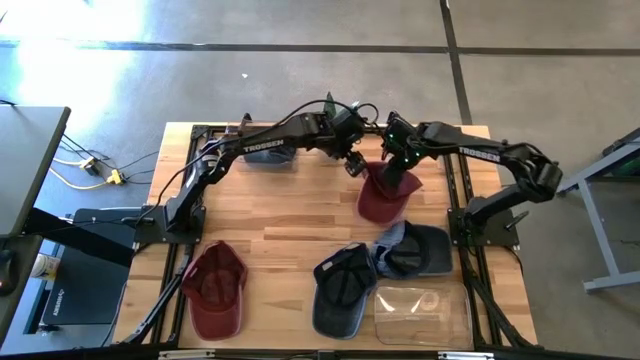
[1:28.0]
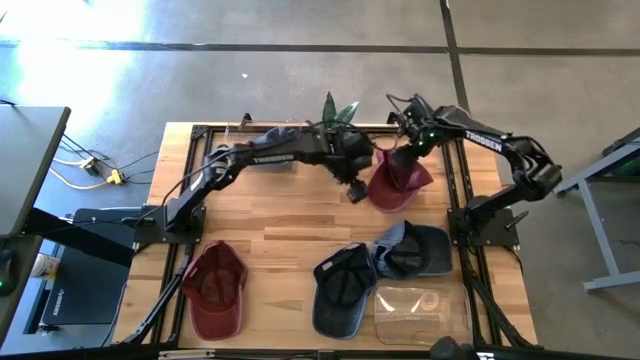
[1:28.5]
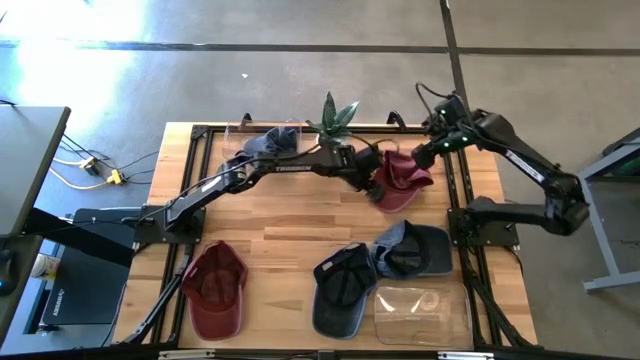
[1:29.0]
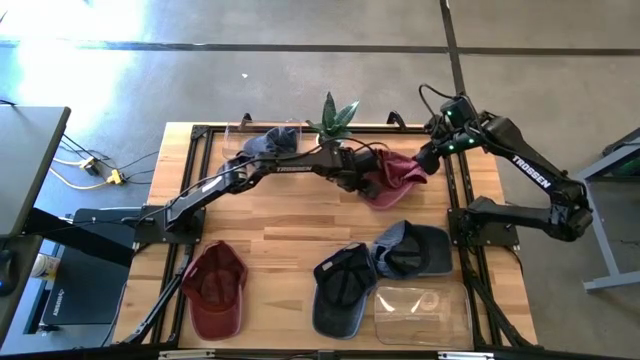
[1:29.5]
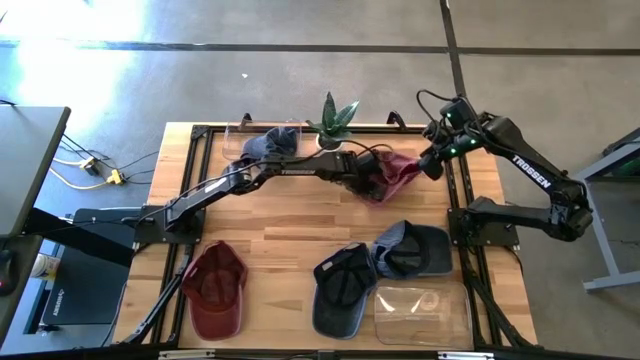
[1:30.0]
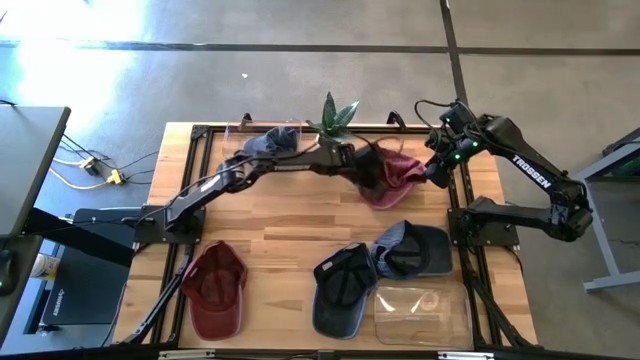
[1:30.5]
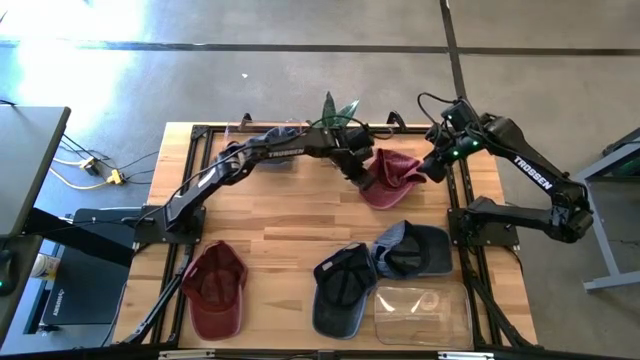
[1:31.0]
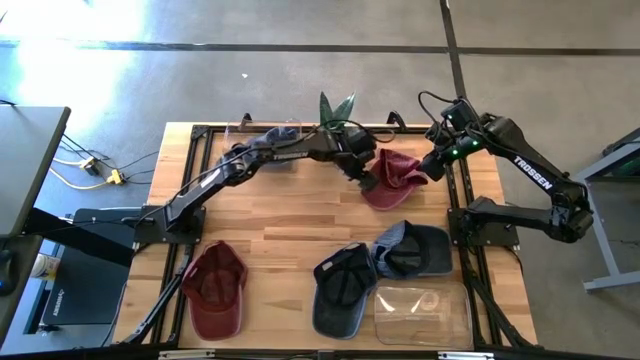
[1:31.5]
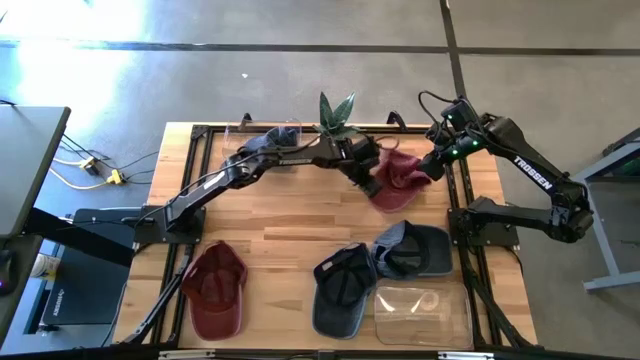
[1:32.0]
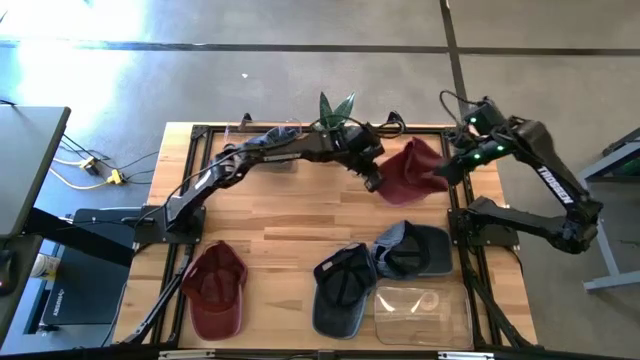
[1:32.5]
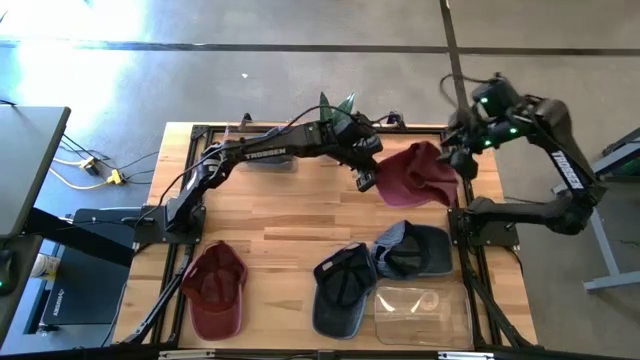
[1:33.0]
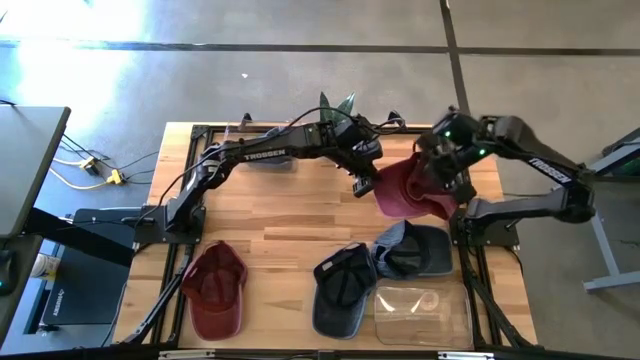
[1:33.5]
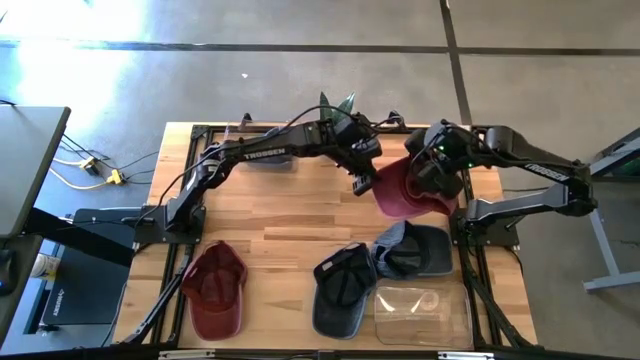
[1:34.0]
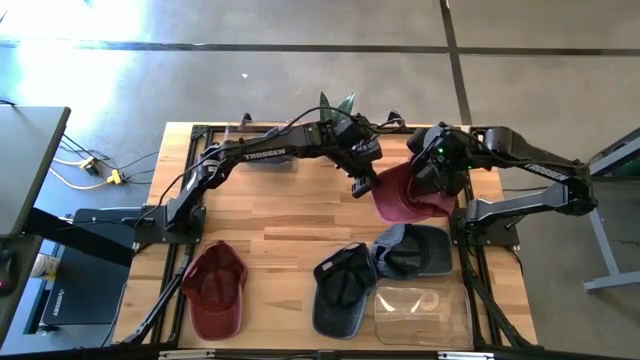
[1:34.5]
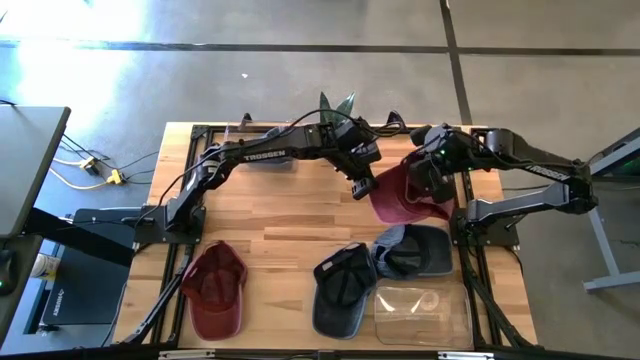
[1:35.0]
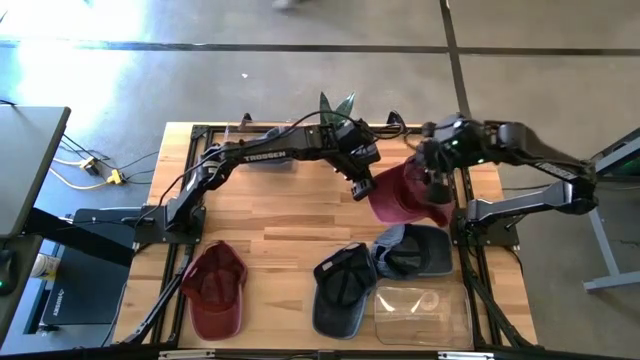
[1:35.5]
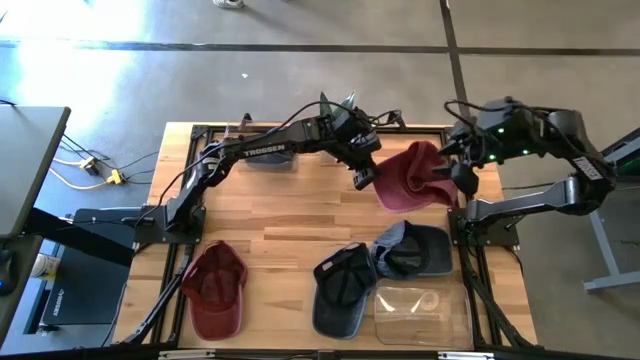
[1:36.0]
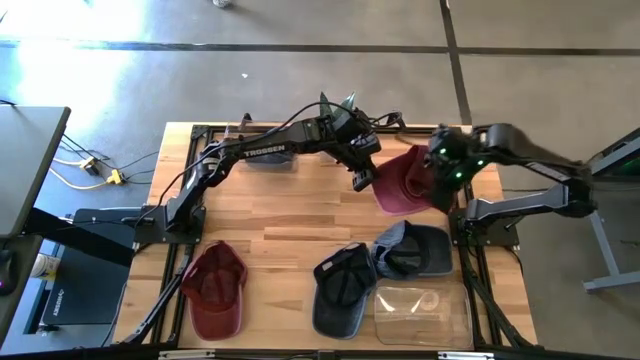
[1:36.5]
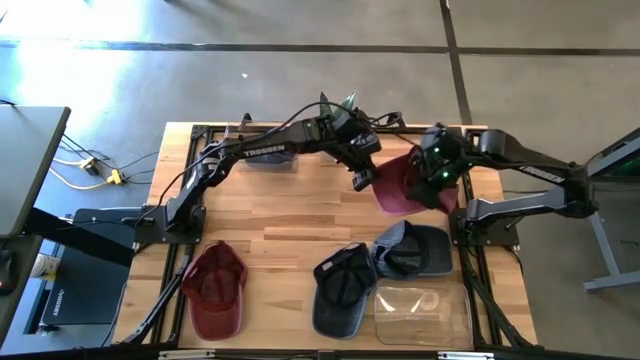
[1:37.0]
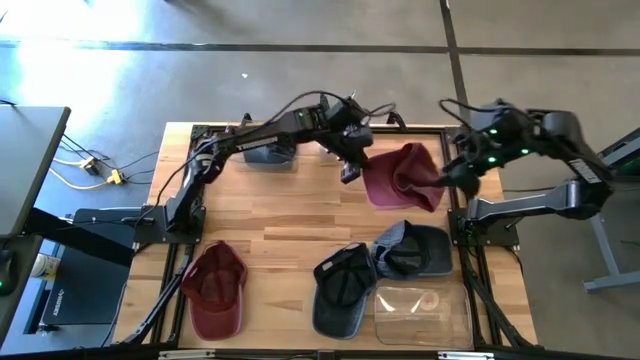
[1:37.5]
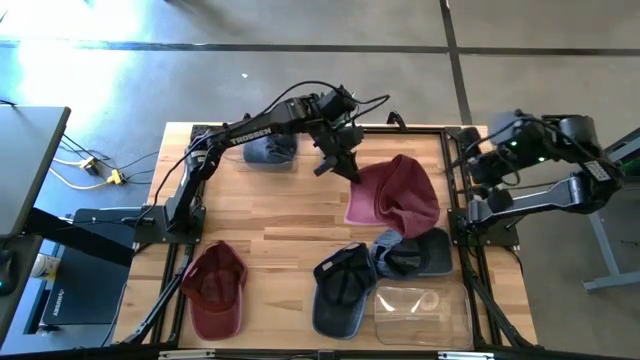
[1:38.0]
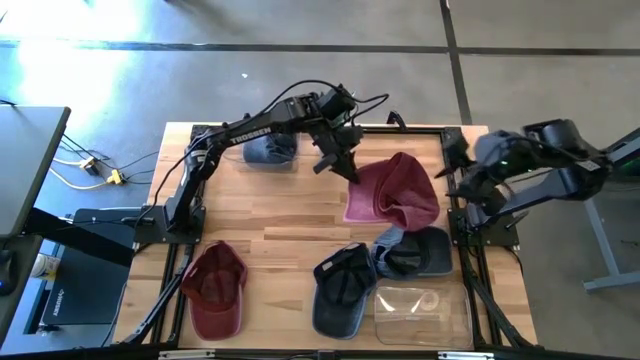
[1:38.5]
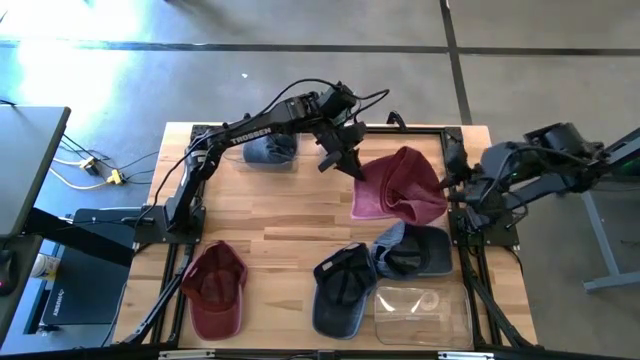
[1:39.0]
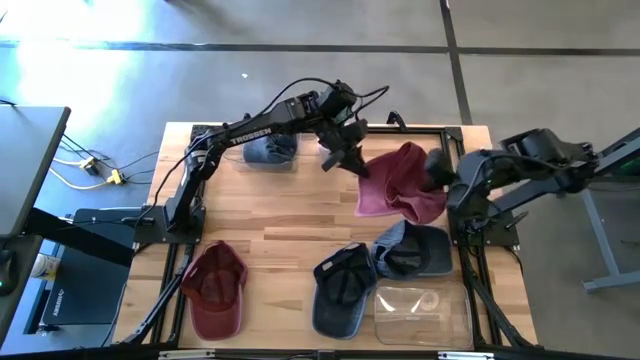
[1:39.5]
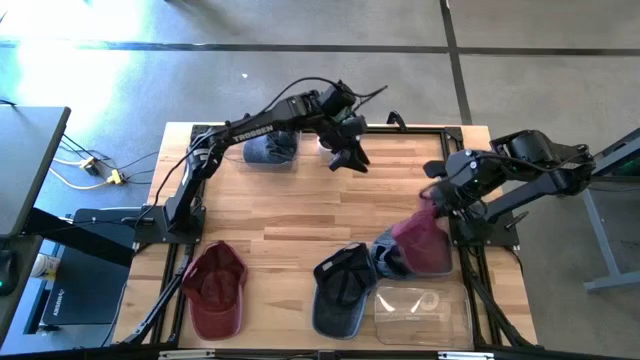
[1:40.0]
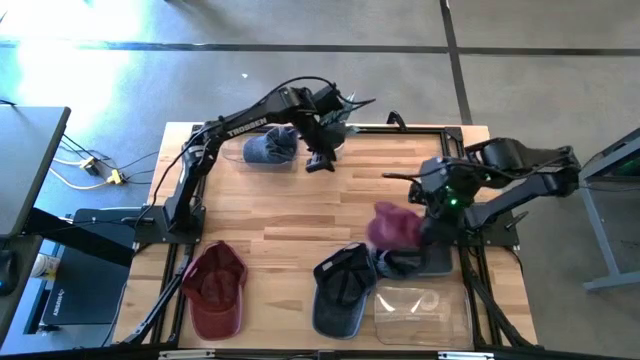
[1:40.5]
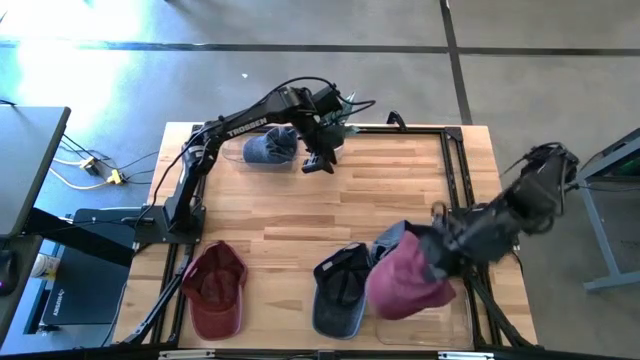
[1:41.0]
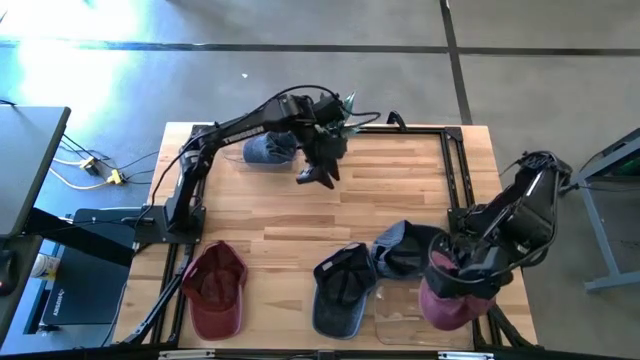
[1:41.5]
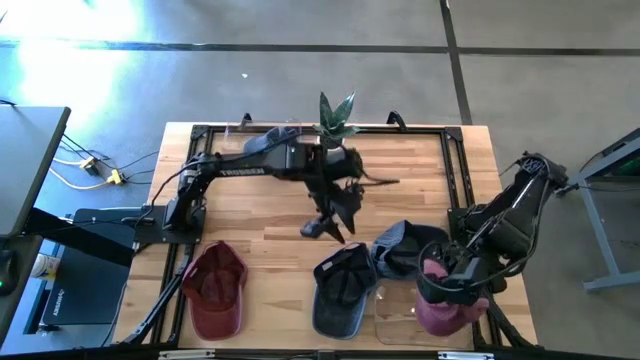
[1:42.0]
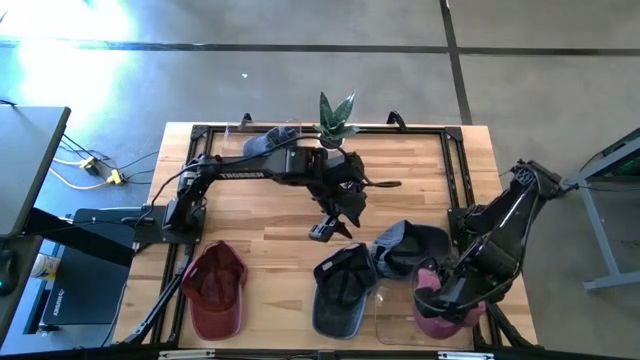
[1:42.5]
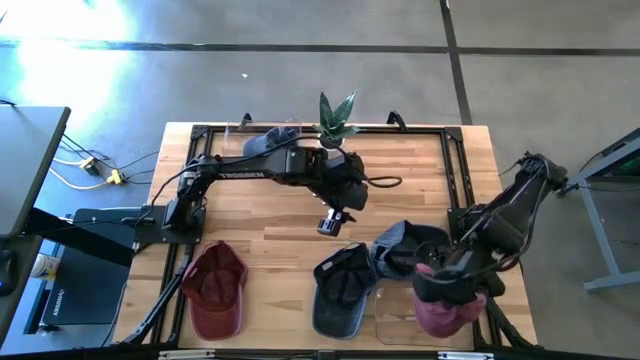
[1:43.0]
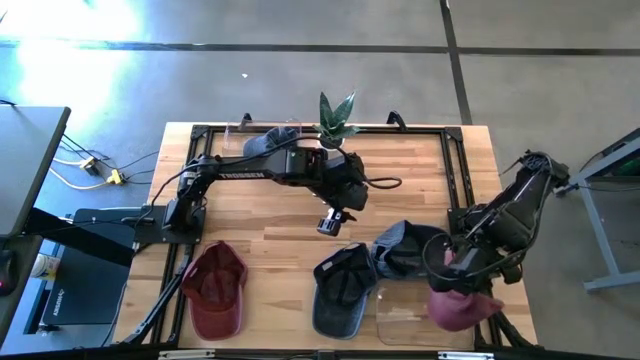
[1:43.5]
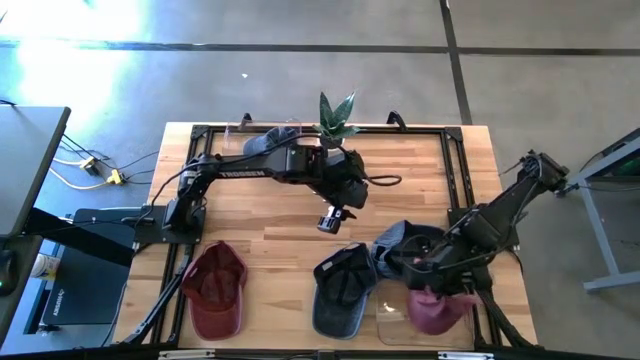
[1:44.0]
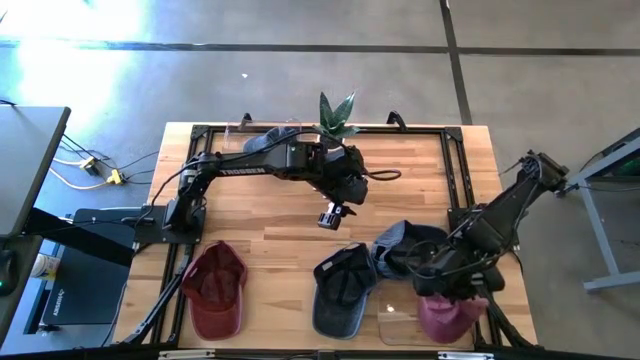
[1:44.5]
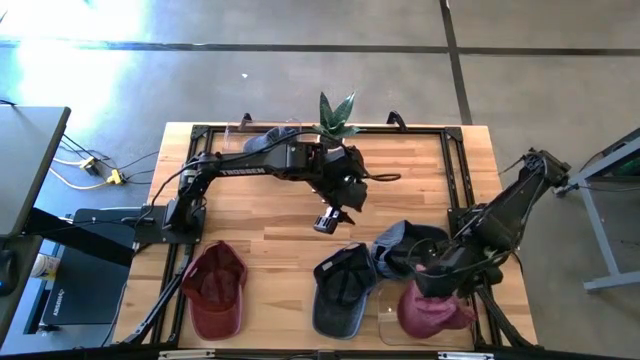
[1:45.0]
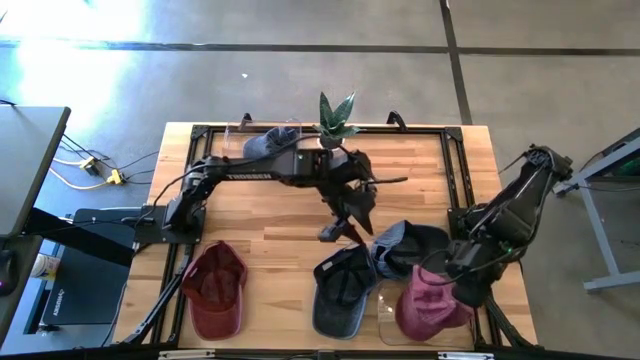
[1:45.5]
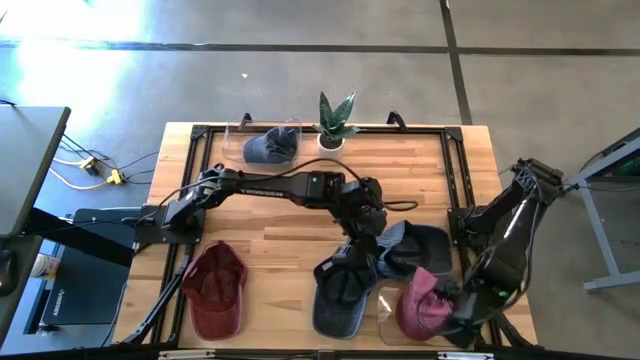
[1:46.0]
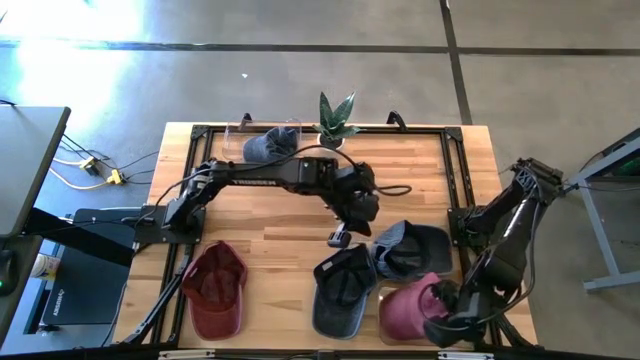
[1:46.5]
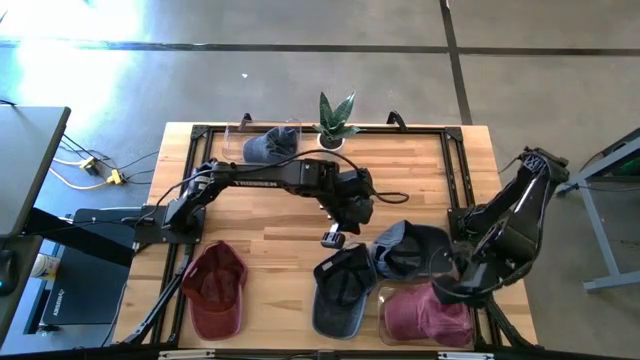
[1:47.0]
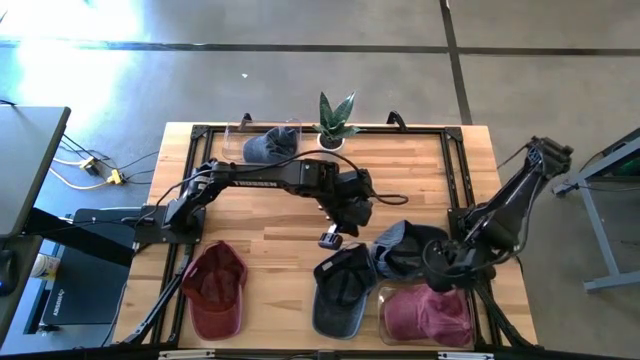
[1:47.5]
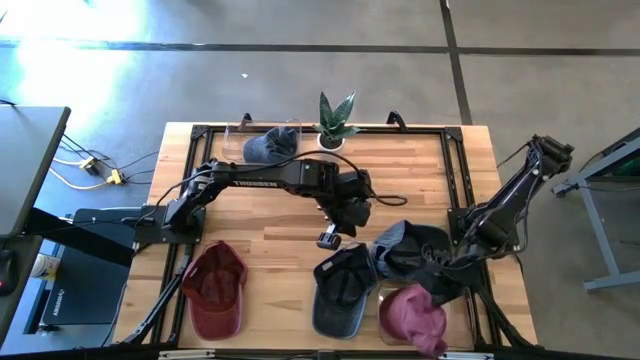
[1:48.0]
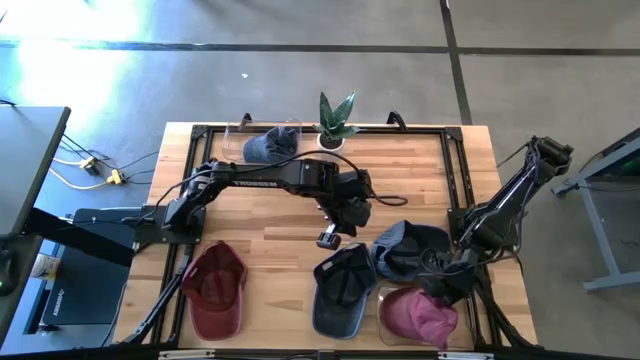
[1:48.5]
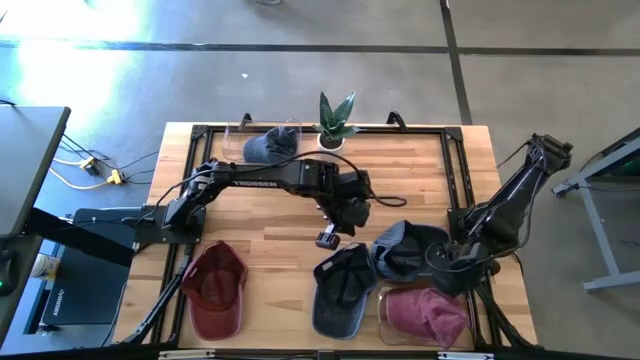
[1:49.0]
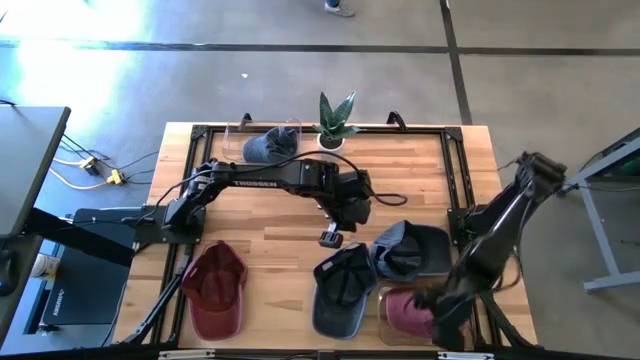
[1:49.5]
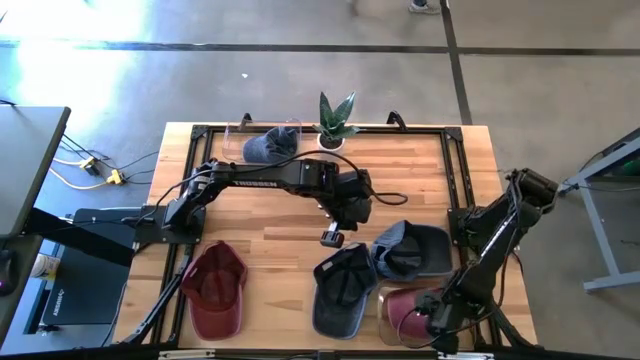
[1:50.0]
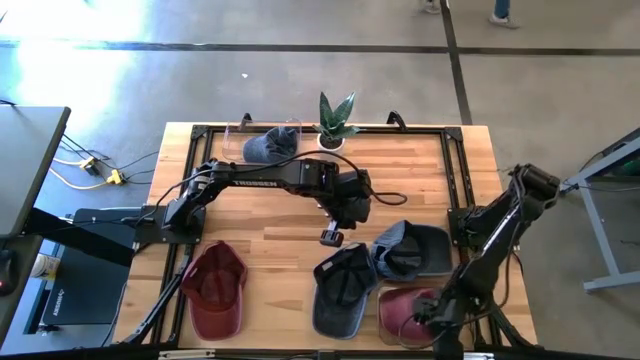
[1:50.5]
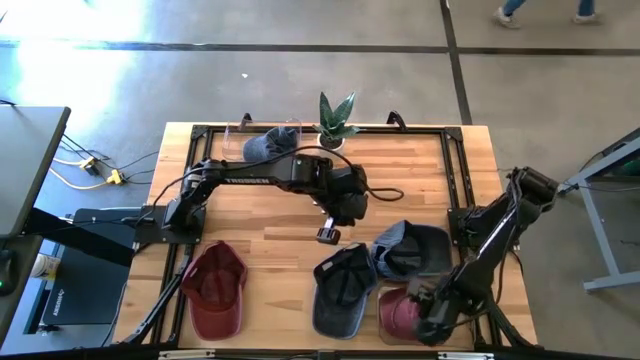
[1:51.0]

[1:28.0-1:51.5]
Task: Pick & Place hat
Put the top red cap into the bottom transparent bin
